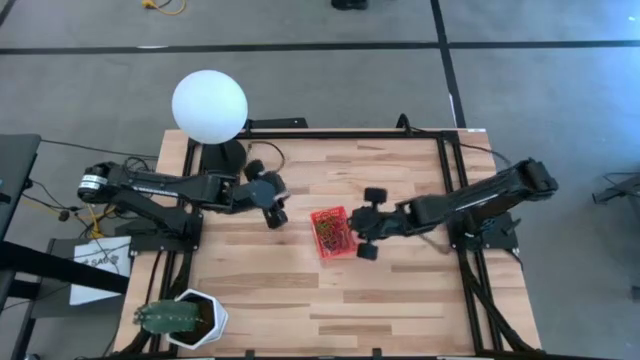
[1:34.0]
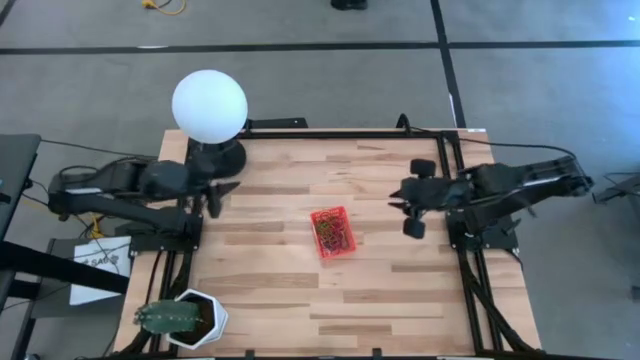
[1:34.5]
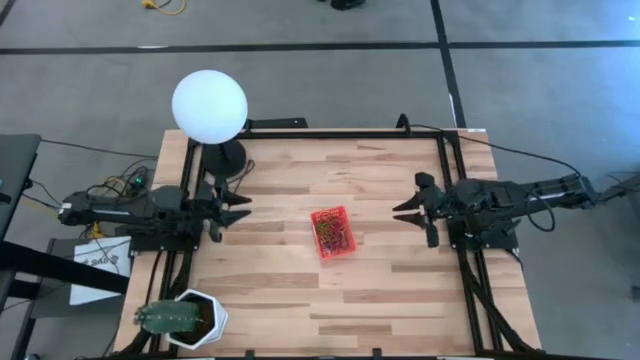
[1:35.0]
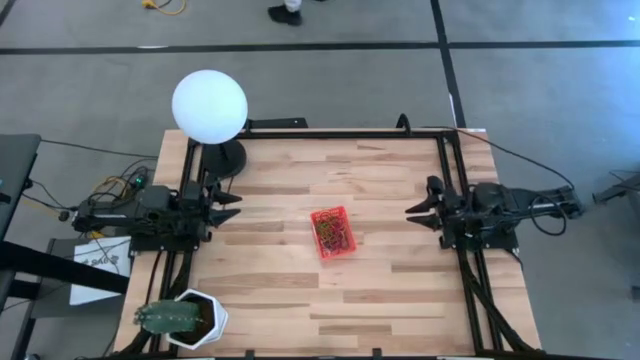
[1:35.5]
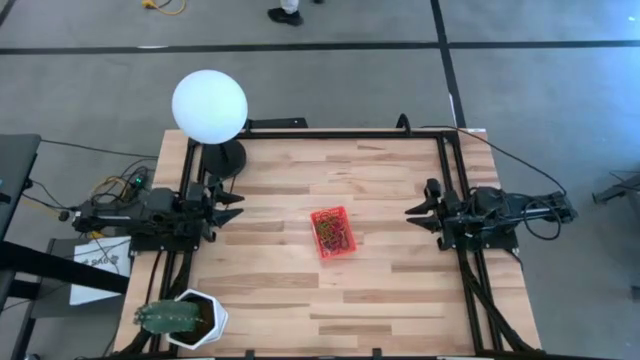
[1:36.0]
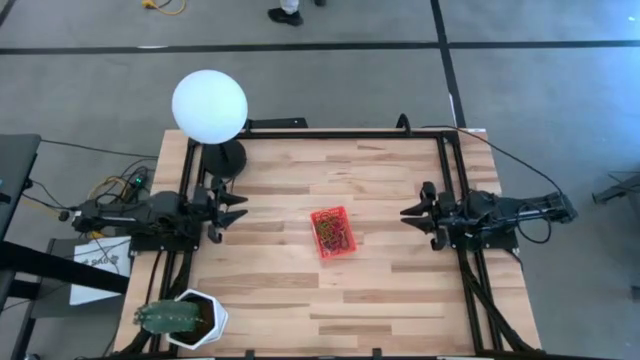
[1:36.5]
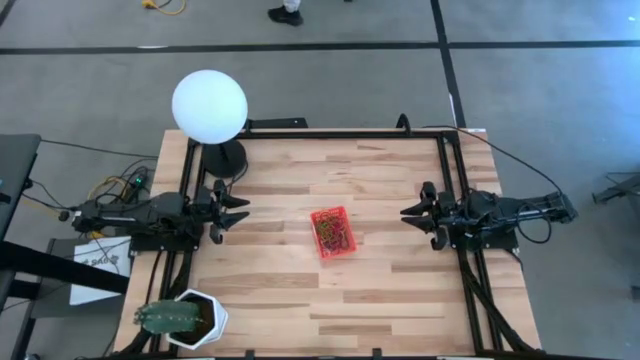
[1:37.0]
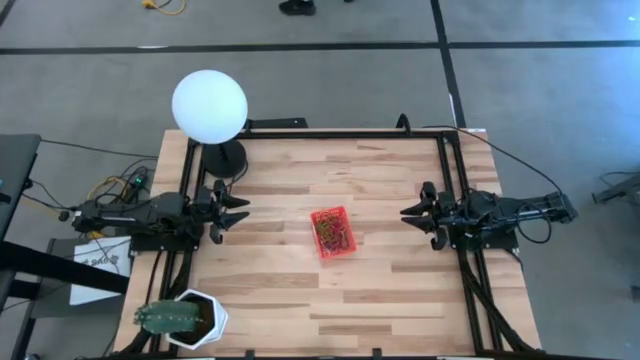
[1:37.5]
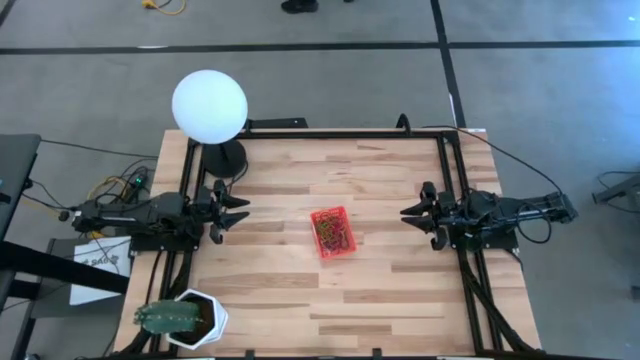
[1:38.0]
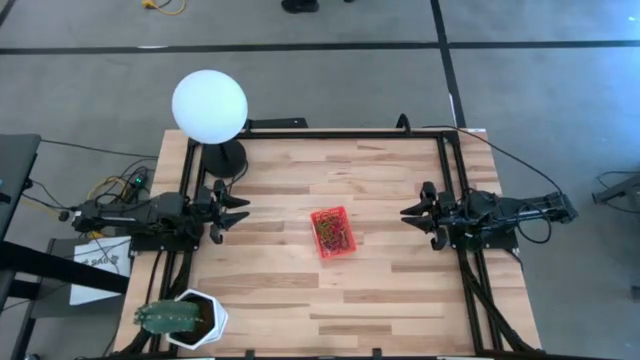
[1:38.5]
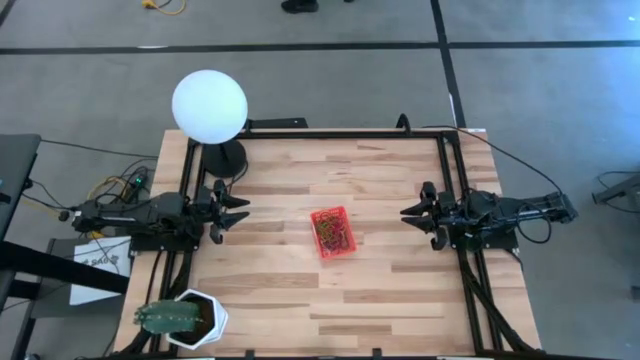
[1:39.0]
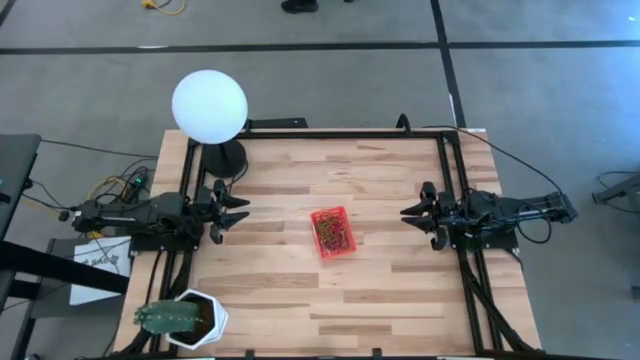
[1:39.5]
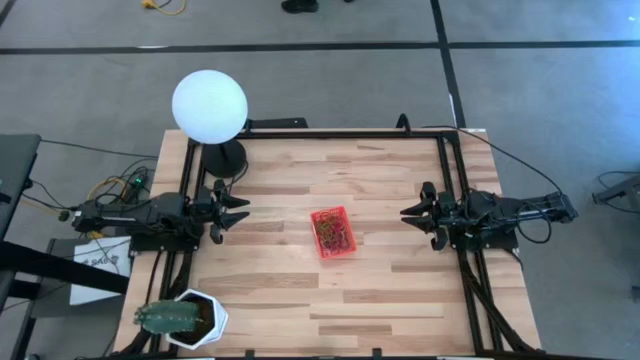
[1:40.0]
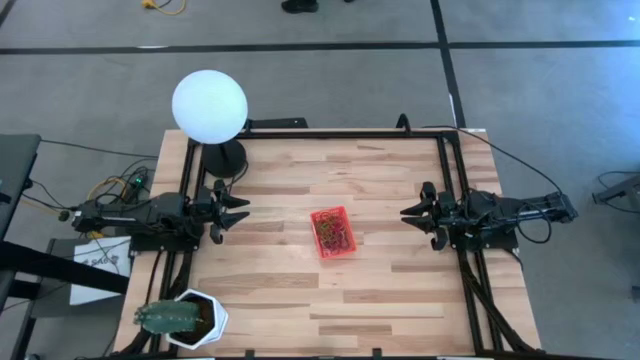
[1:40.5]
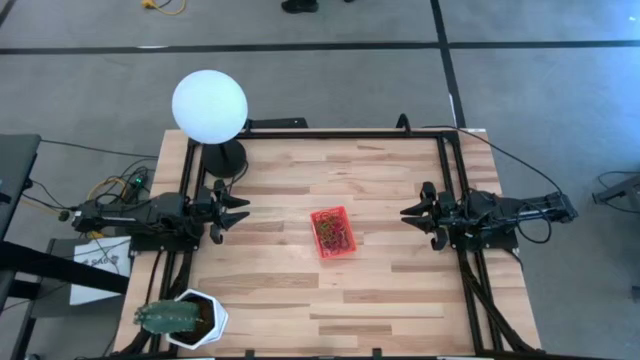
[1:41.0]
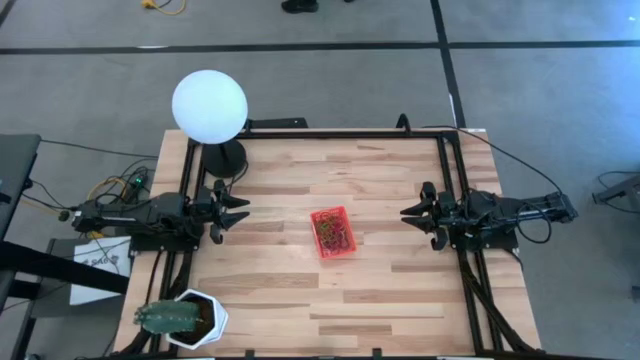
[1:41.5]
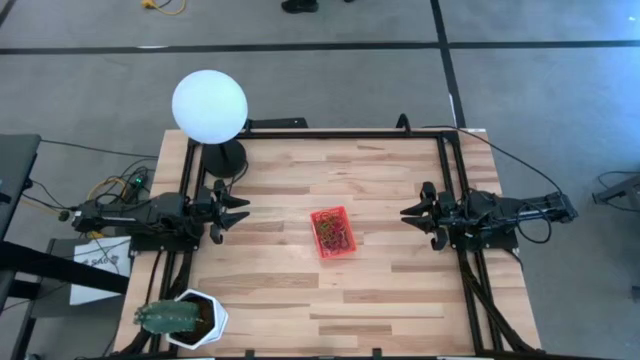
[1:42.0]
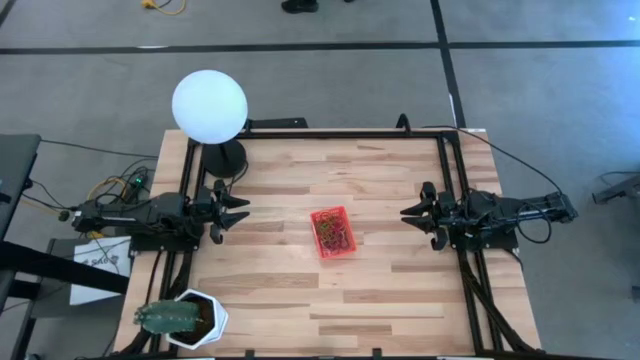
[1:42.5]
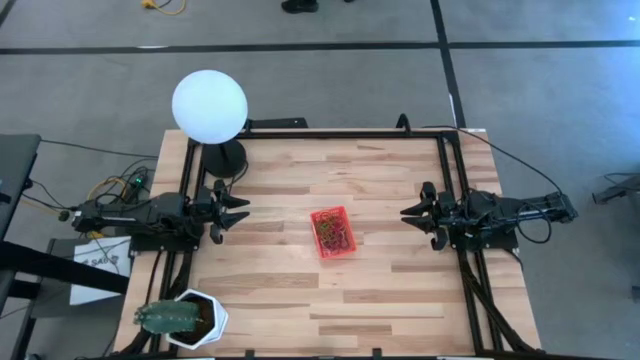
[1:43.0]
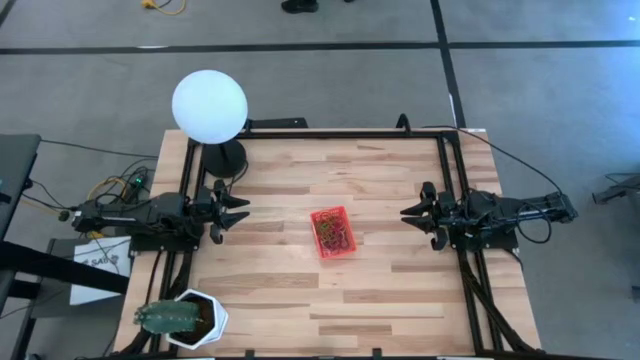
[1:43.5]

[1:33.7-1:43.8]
Task: Pick and place items into bin
Return to Home Position

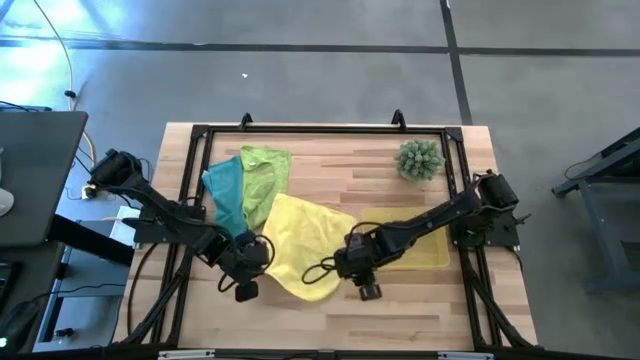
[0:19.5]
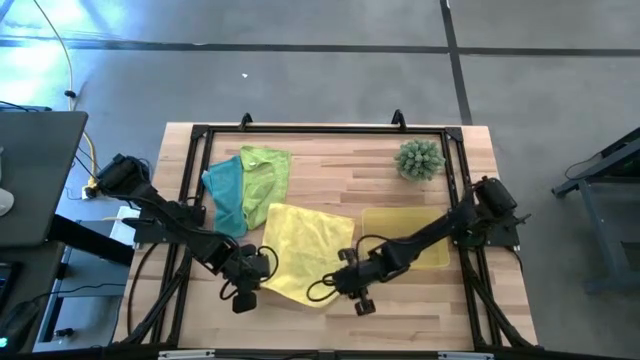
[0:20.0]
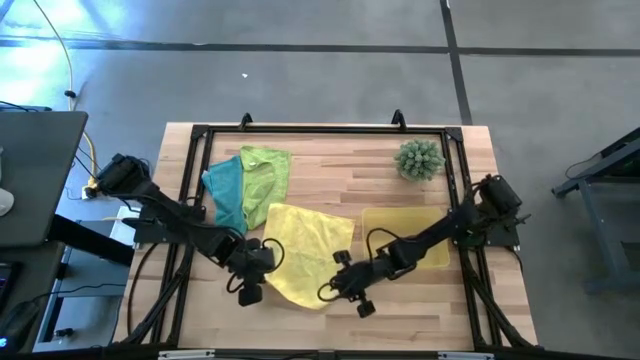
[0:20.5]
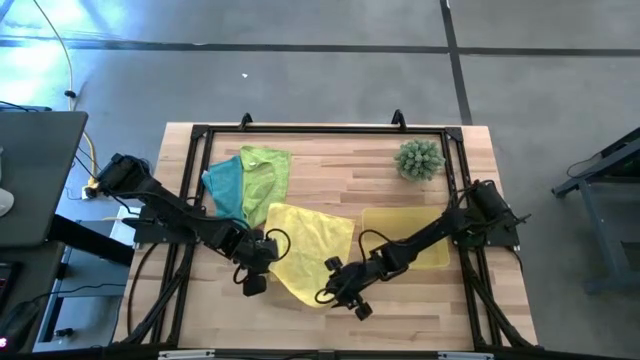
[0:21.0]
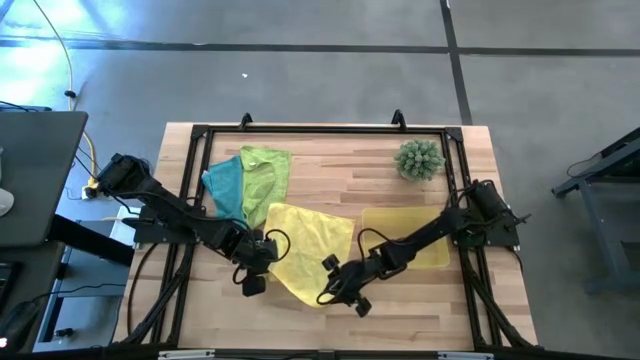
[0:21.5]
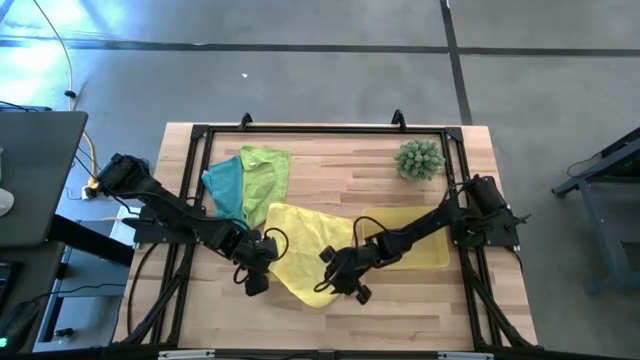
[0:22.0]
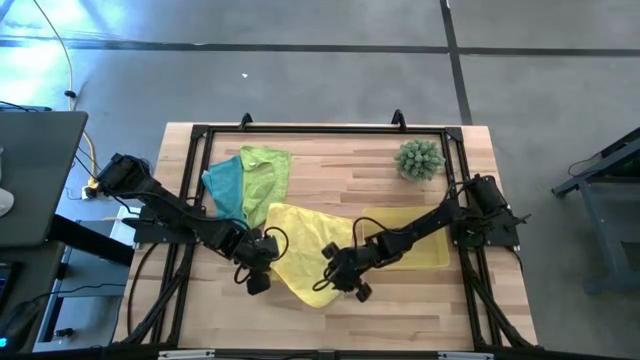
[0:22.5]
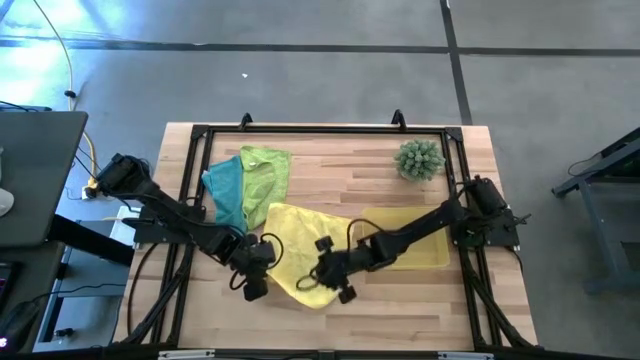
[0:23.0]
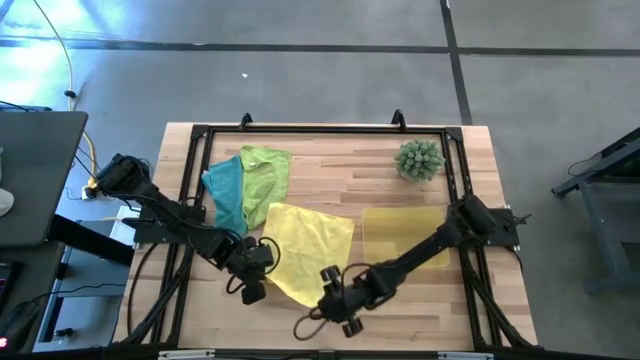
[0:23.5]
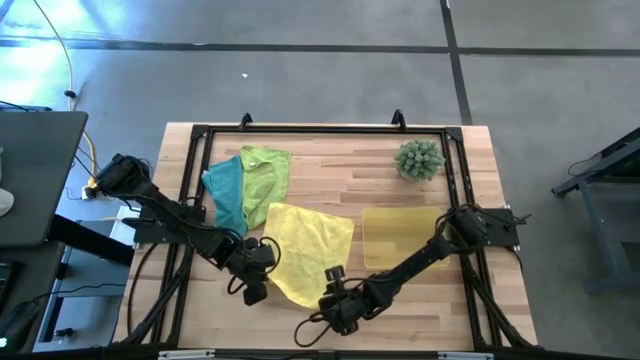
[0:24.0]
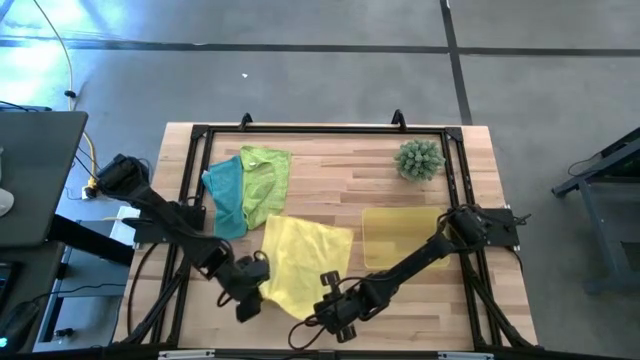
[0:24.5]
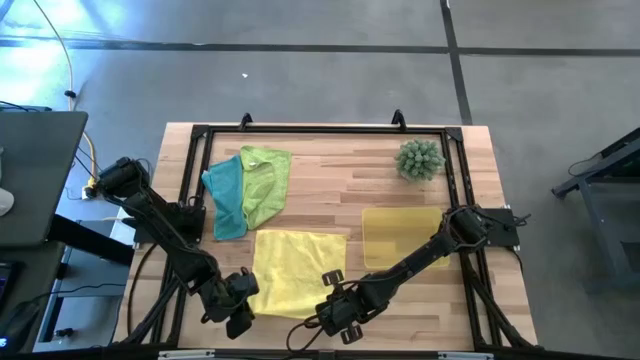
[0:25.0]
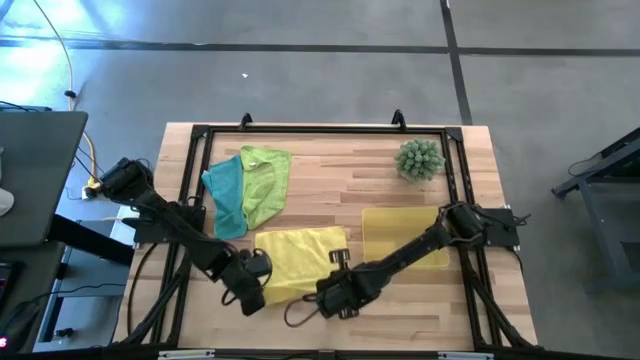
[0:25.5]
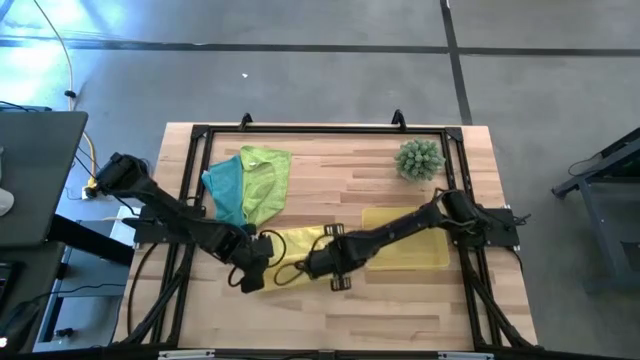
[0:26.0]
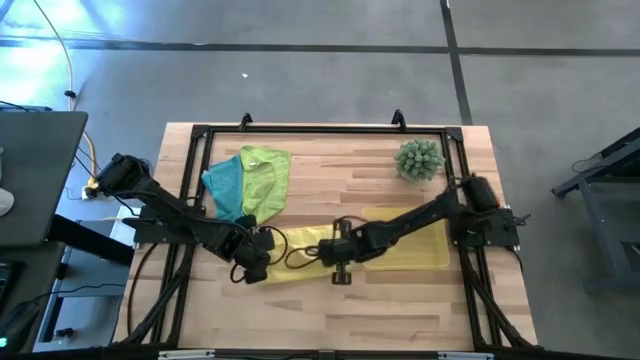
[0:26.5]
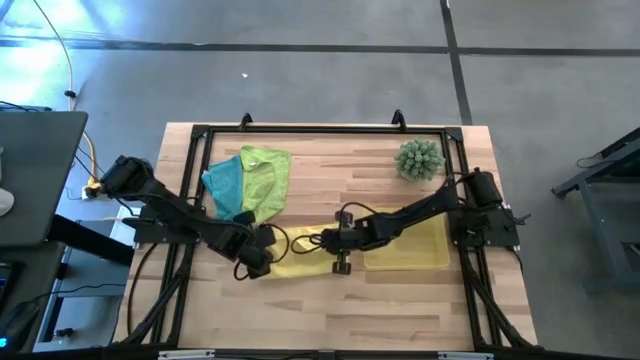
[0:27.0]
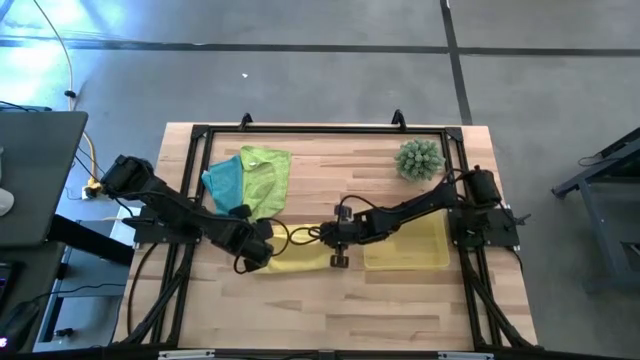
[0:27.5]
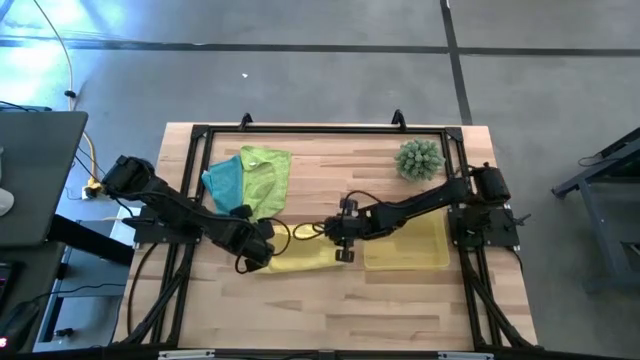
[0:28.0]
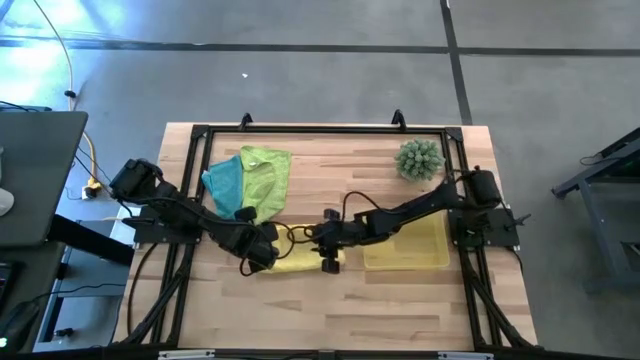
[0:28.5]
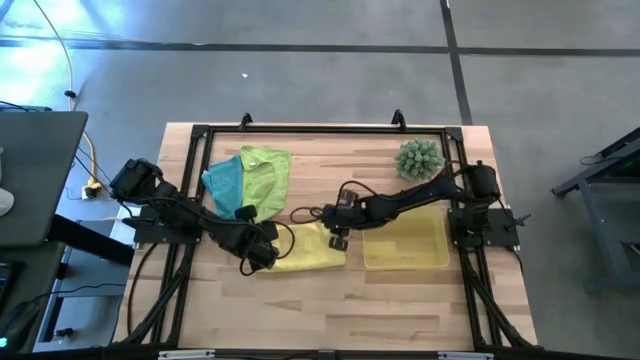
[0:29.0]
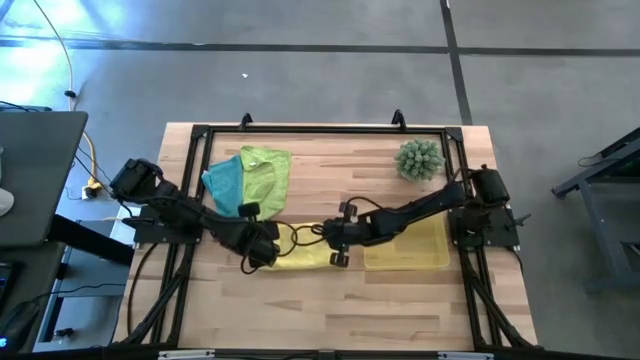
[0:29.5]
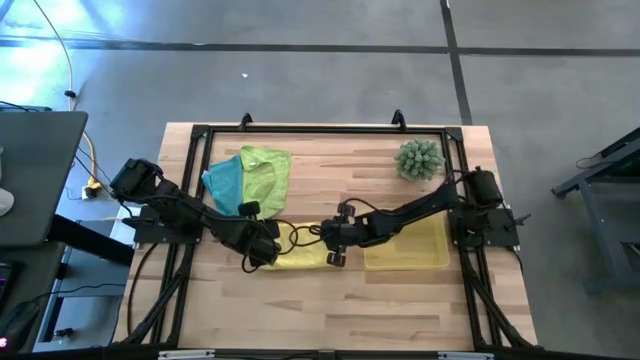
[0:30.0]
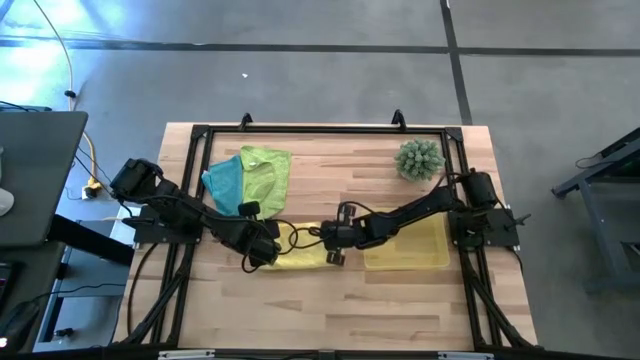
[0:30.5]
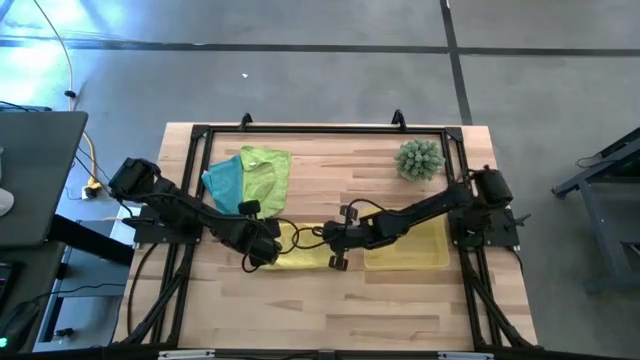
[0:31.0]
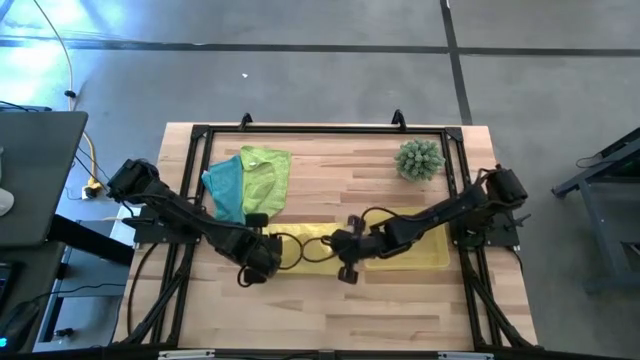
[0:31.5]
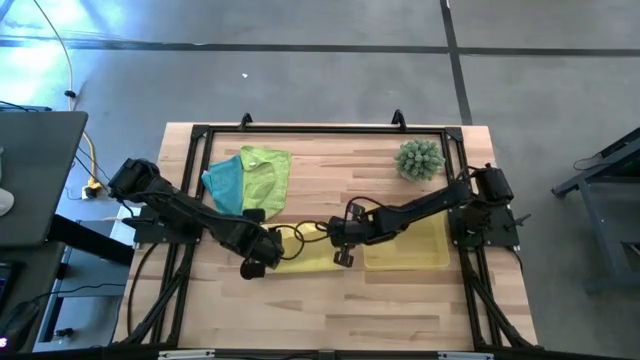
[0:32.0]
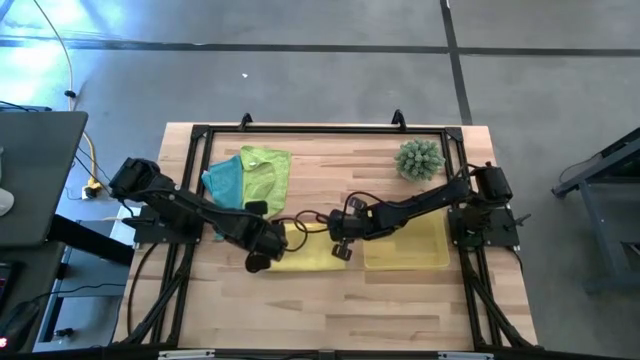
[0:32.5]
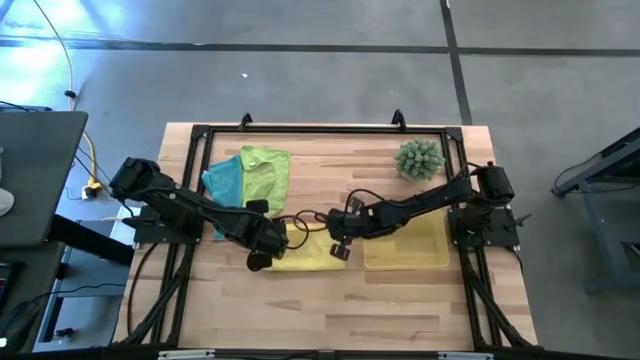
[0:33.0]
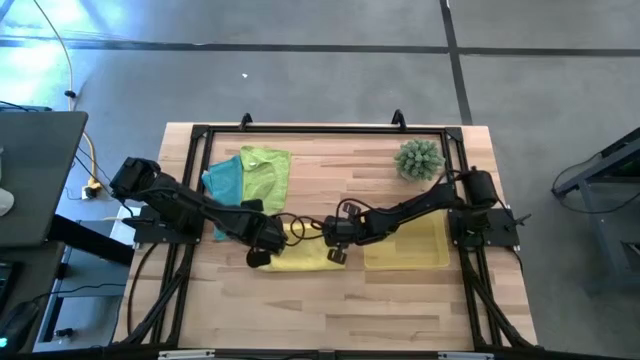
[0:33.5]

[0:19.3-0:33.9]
Task: Roll microfiber towels into tight, uniform cylinder then place into a basket
Fold the yellow microfiber towel
